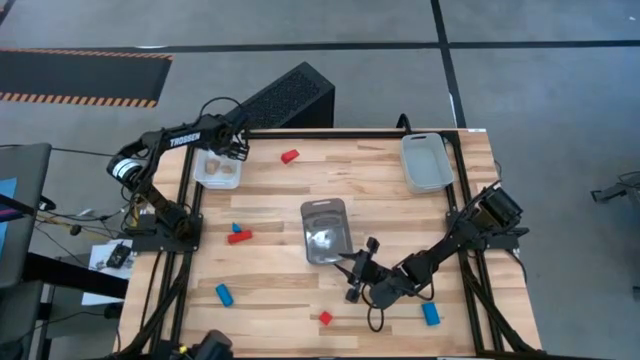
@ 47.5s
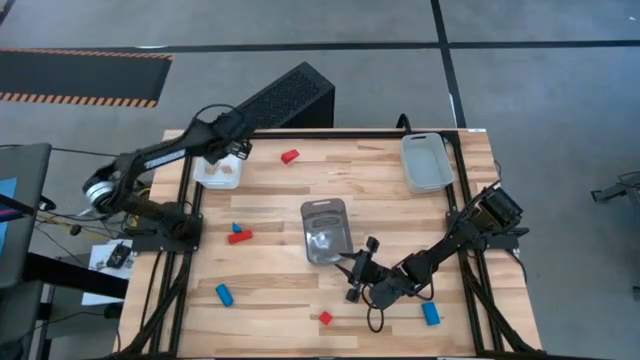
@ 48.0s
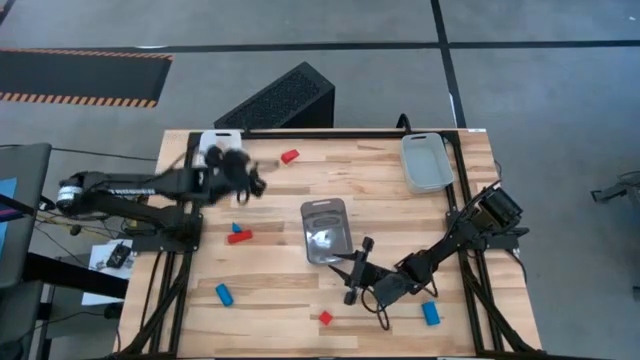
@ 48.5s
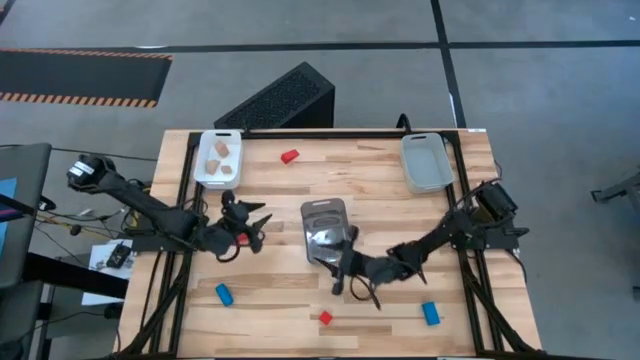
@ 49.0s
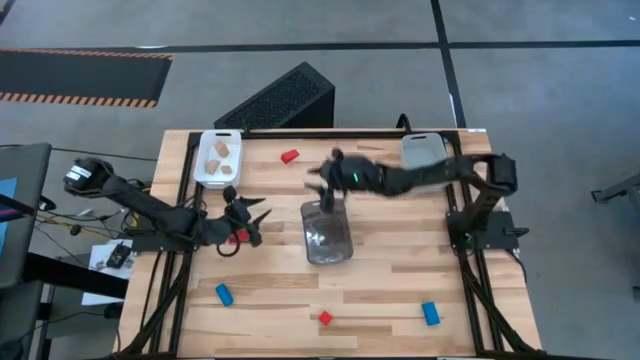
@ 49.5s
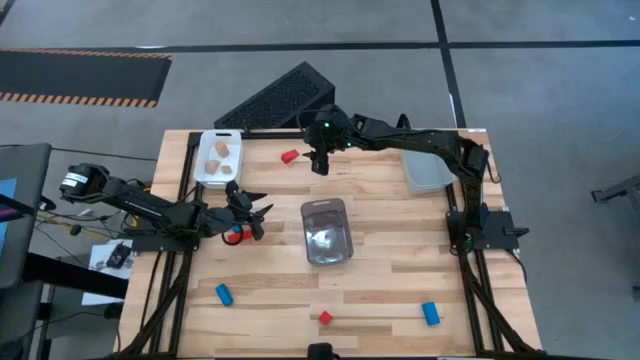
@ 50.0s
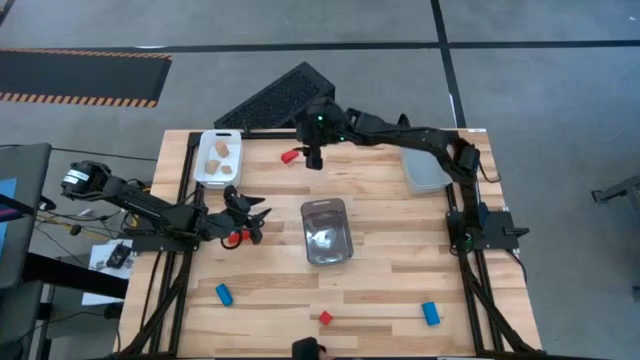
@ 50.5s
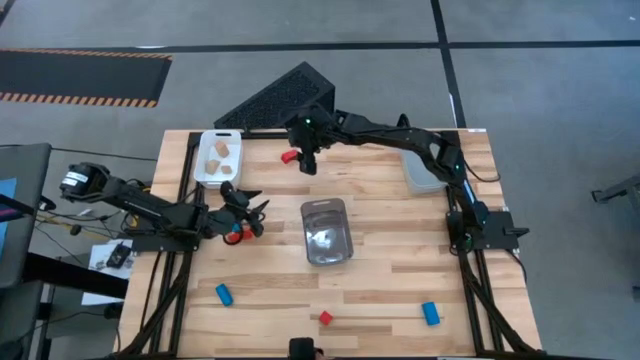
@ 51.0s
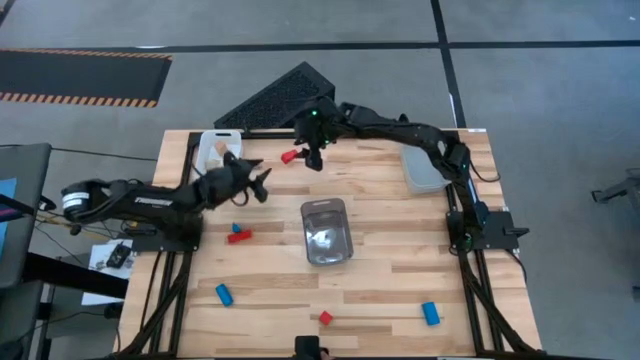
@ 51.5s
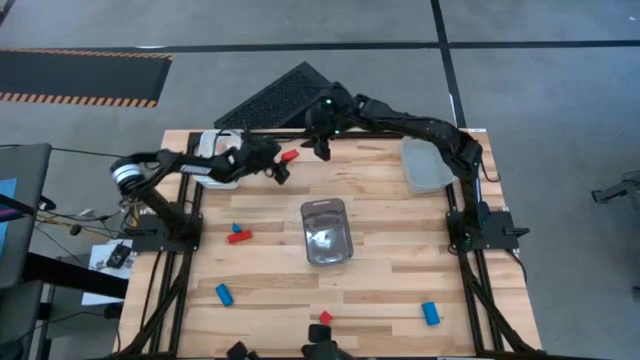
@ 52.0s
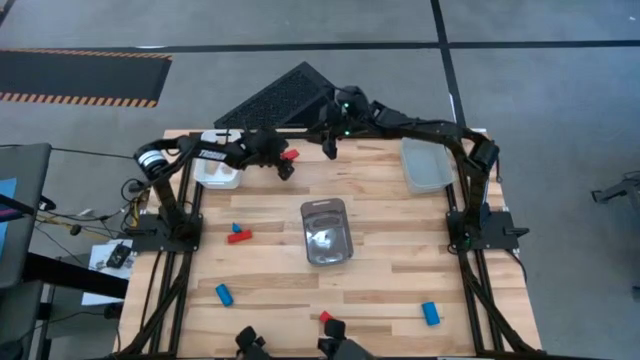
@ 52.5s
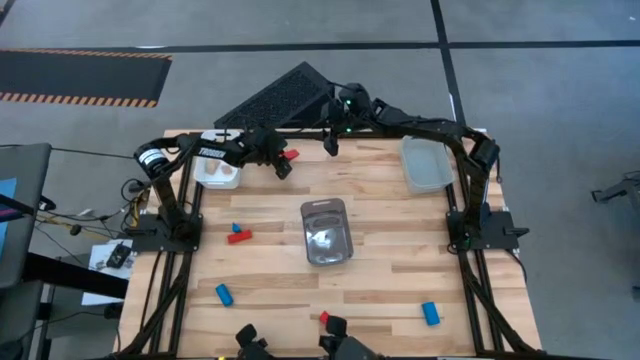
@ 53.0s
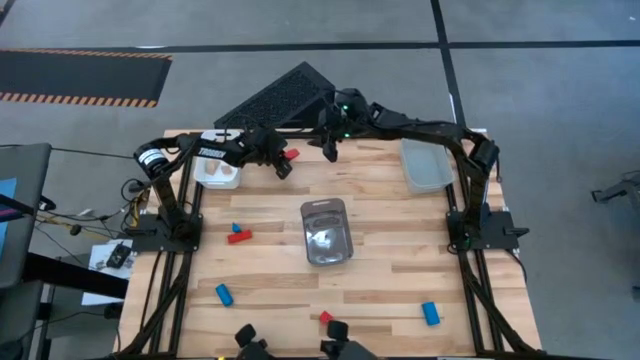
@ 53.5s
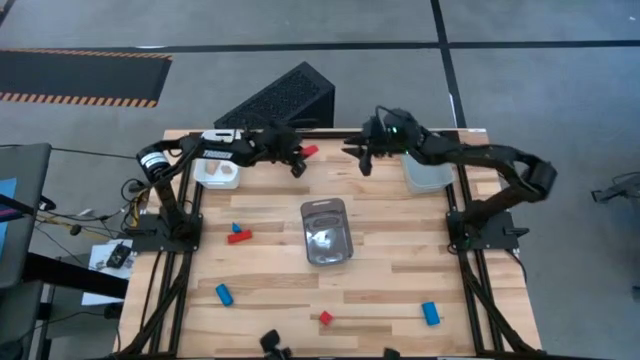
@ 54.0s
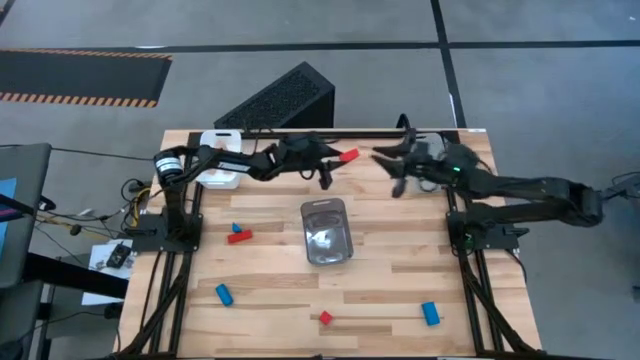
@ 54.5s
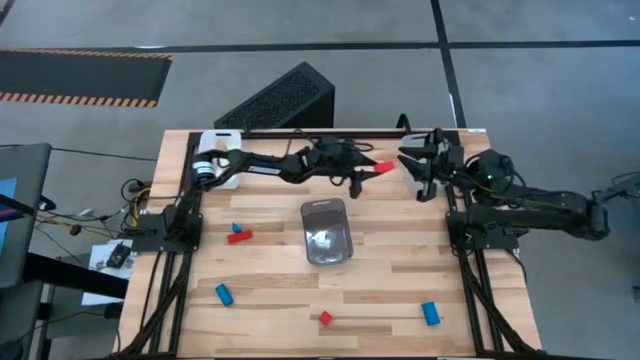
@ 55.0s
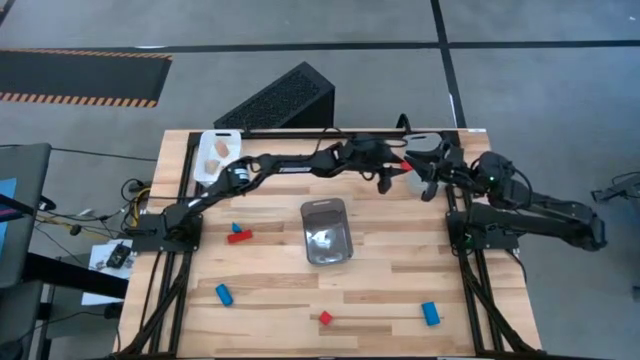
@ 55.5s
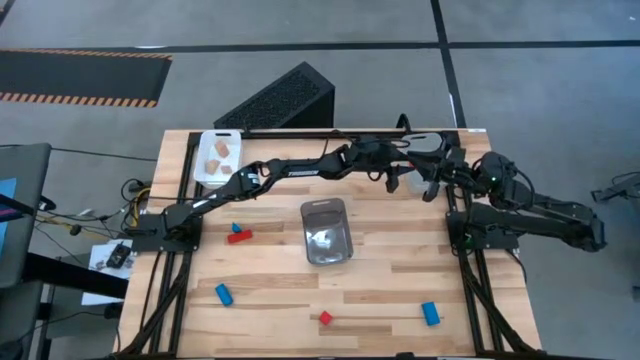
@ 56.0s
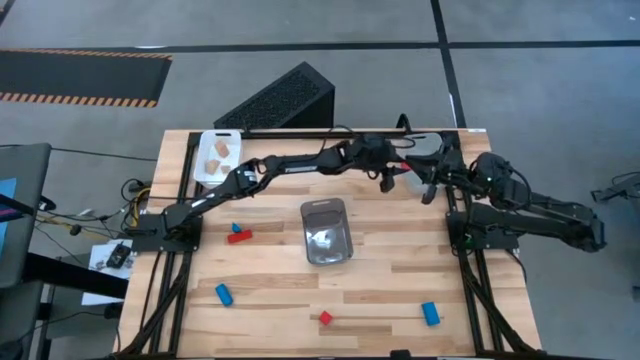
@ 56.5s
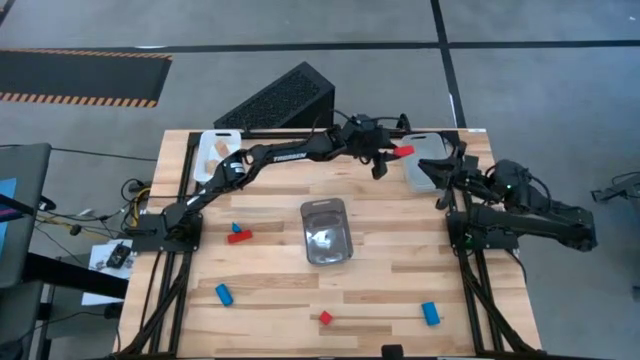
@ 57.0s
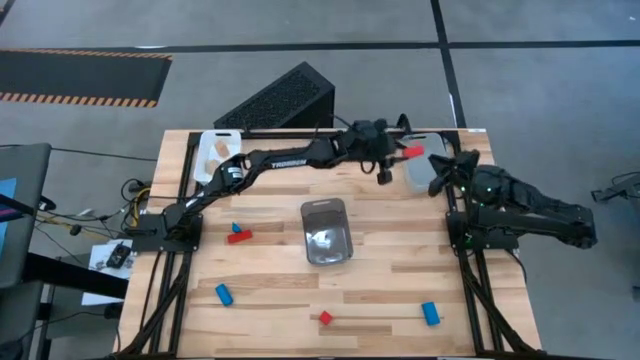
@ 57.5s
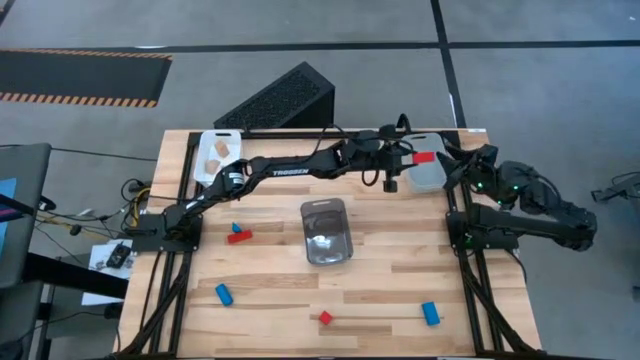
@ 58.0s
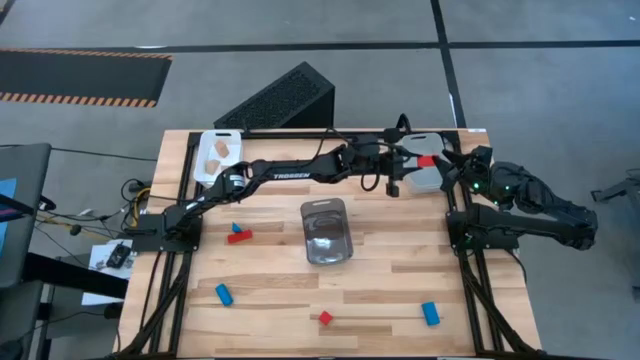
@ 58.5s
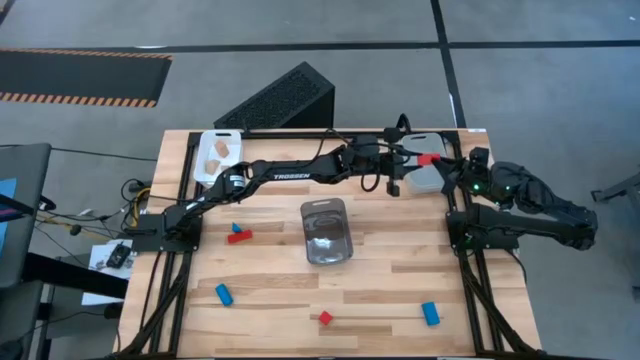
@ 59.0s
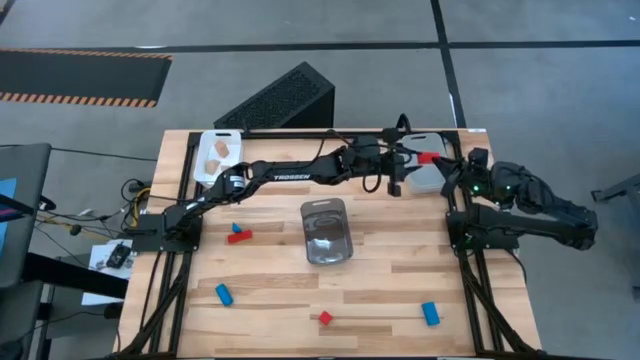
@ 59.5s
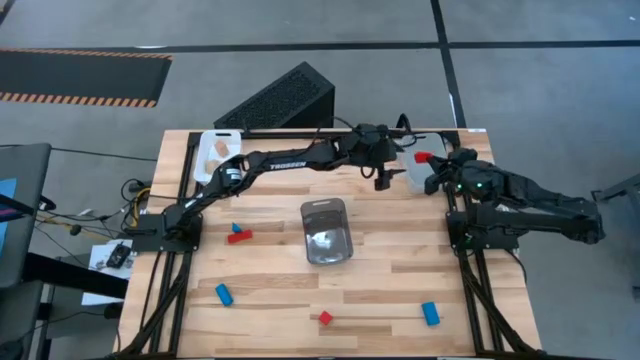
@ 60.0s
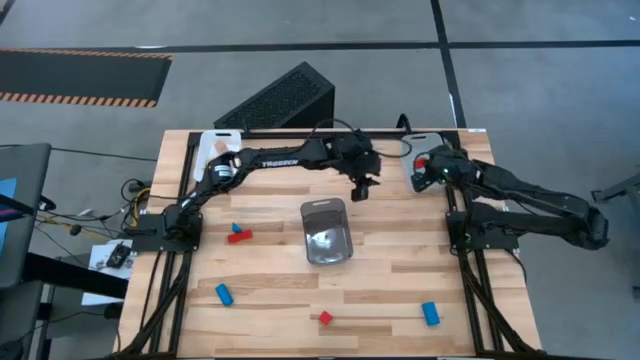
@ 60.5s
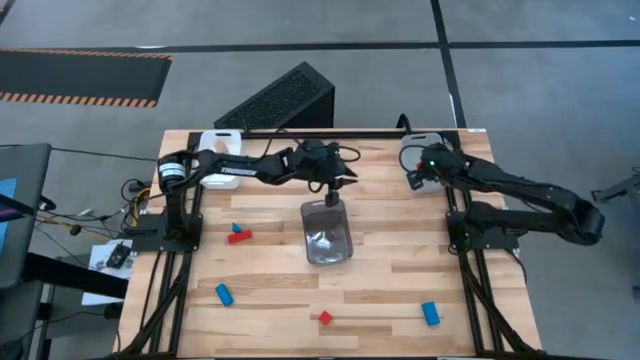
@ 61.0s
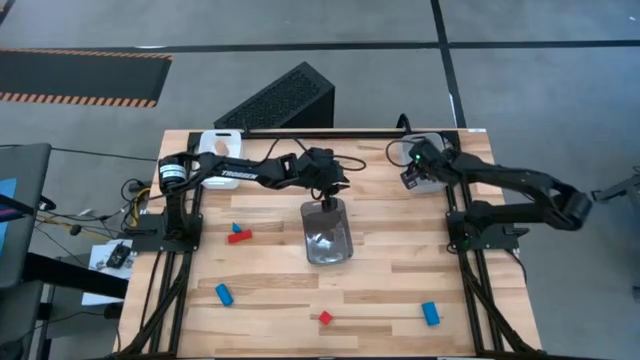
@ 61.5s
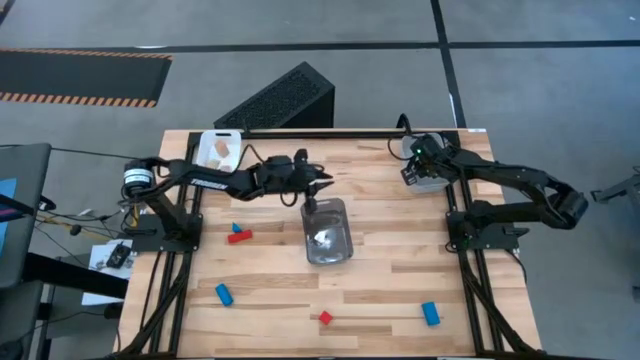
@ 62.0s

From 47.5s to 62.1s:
Task: Sort & place blocks by color
Put the top red block into the gray bin

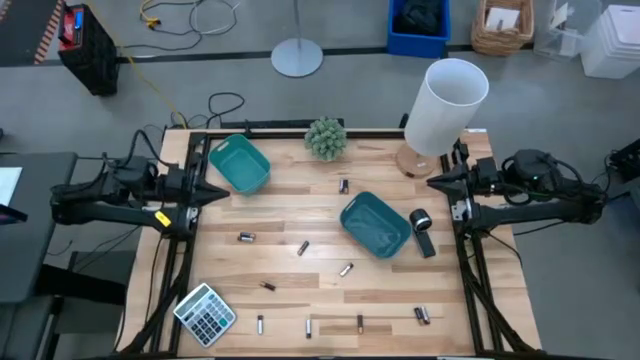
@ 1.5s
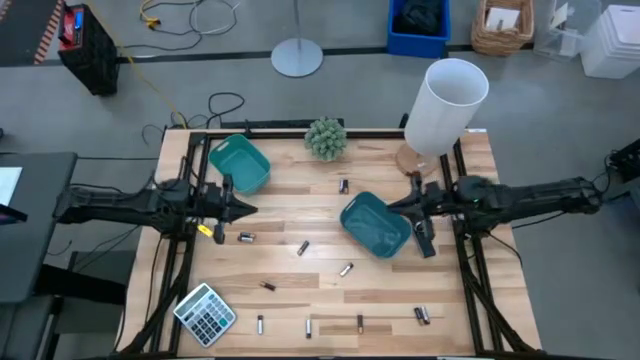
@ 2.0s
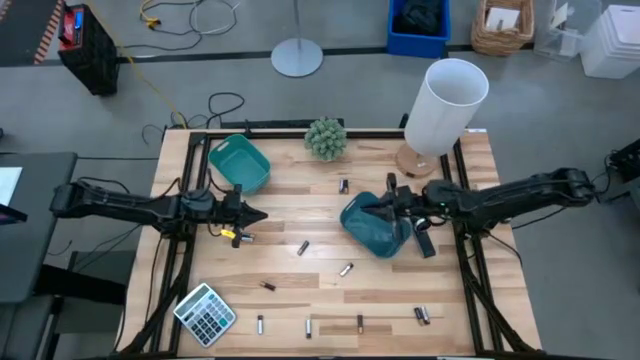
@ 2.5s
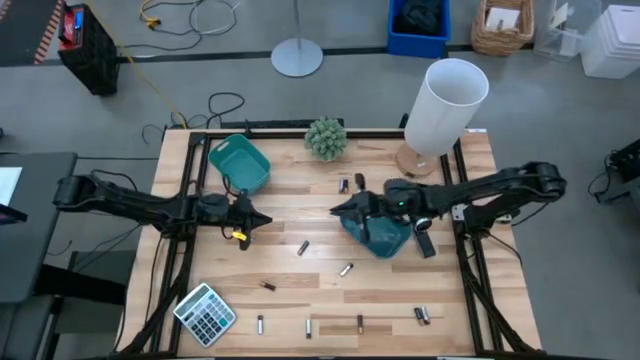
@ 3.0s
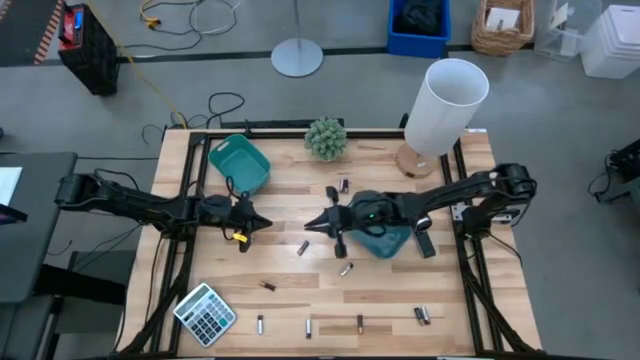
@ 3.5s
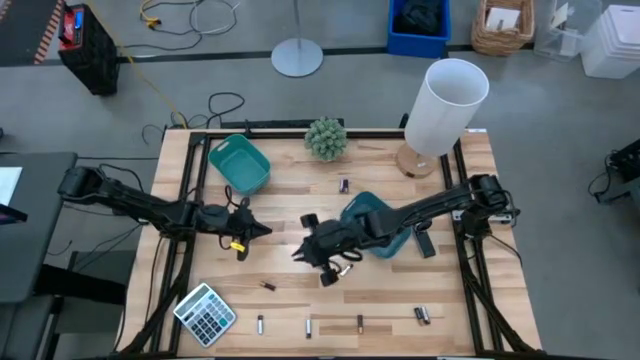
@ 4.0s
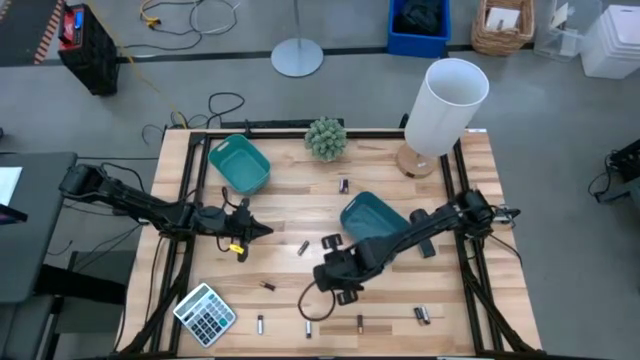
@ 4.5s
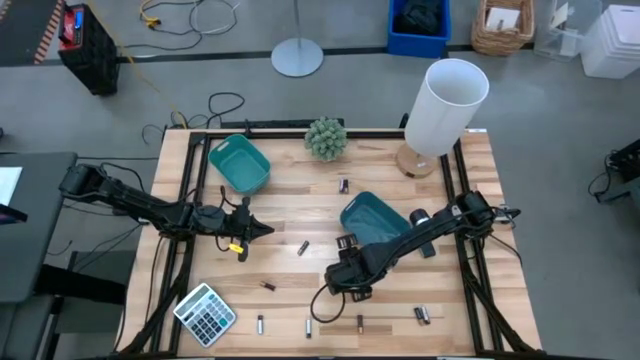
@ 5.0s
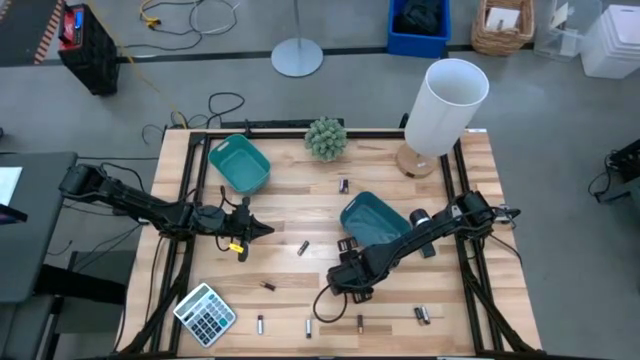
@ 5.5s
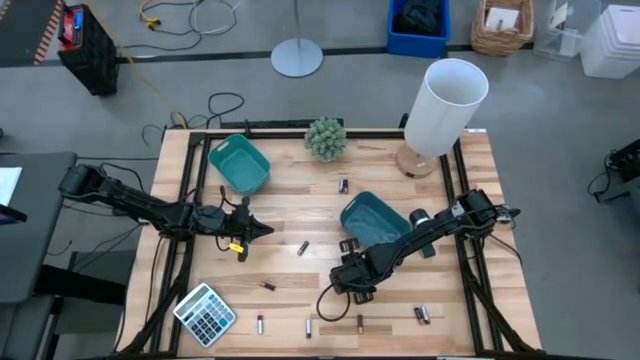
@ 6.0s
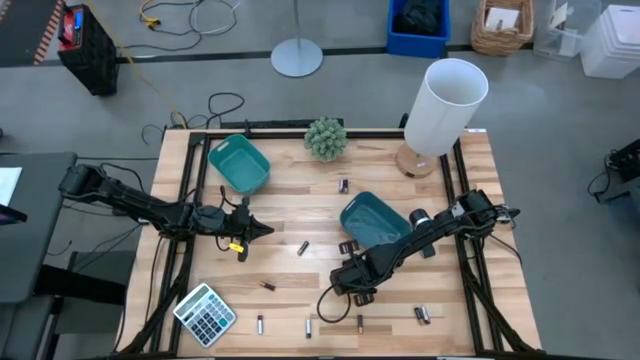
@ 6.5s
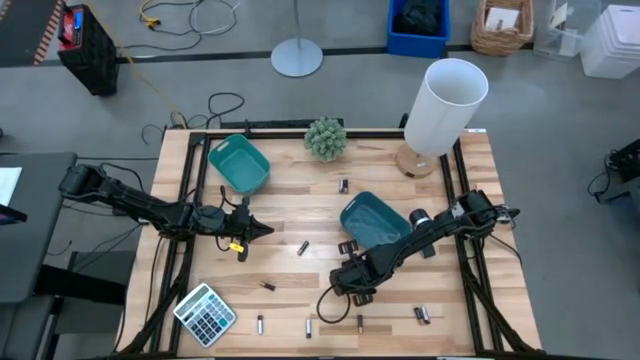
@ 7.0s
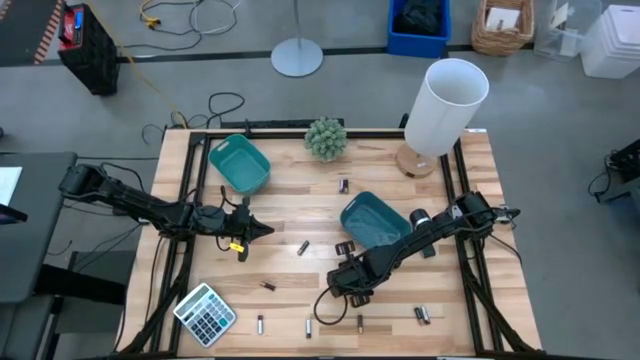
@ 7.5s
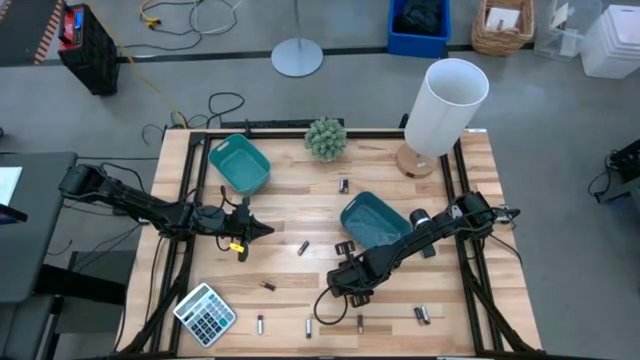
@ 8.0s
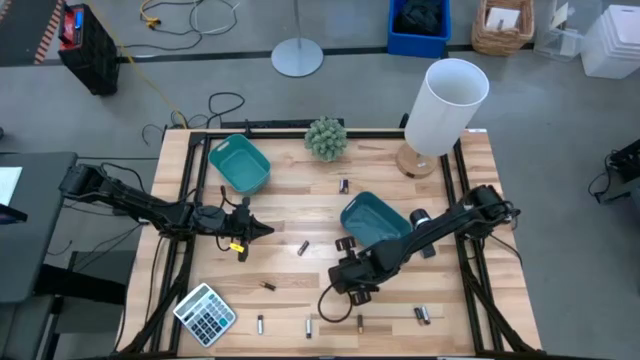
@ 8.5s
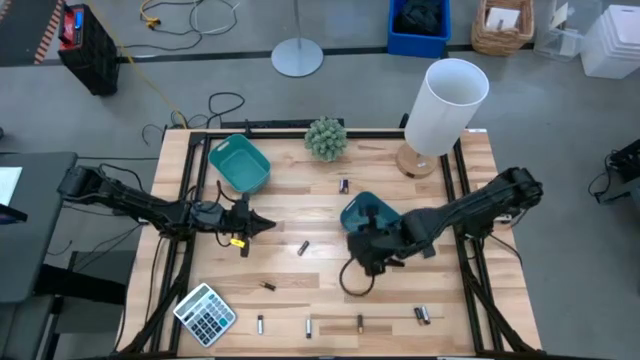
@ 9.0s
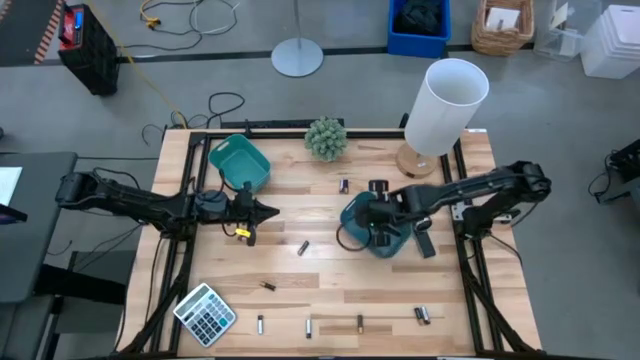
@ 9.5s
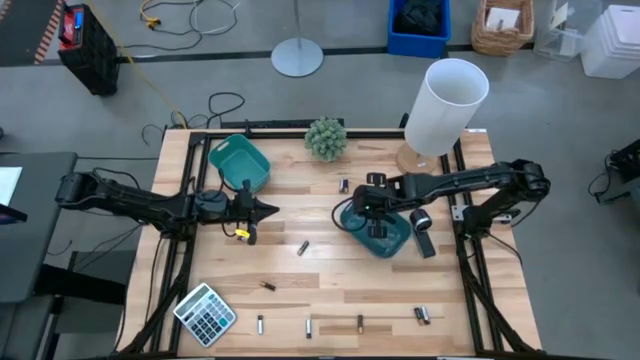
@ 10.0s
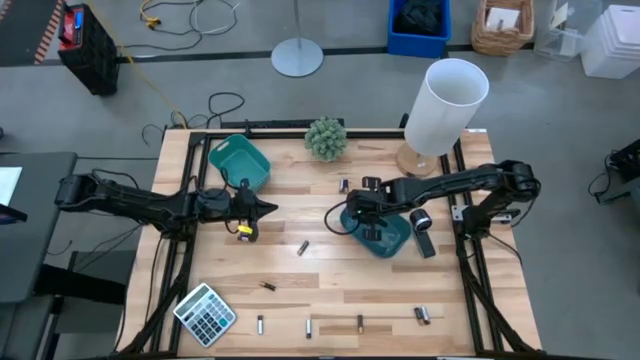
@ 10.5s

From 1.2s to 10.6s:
Task: Sort batteries
Put the silver battery into the blue bin
